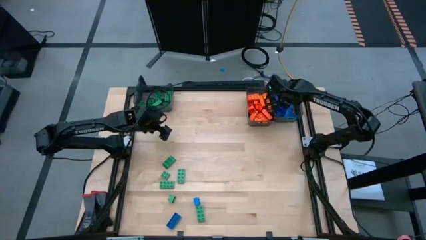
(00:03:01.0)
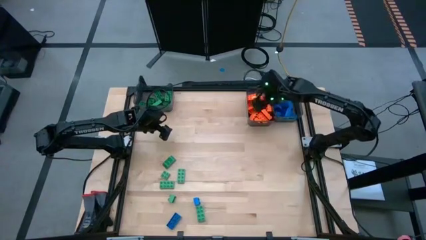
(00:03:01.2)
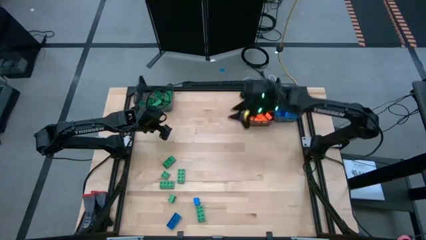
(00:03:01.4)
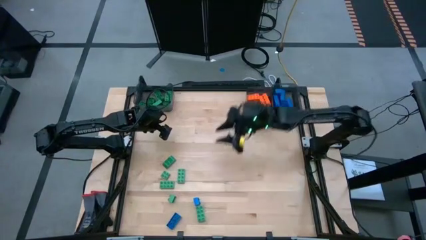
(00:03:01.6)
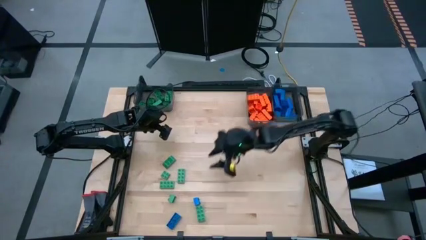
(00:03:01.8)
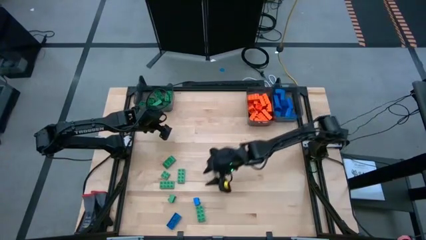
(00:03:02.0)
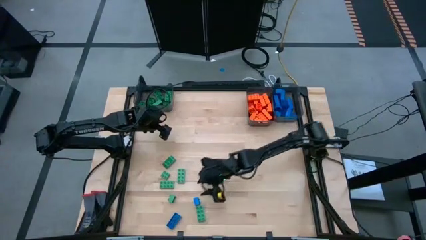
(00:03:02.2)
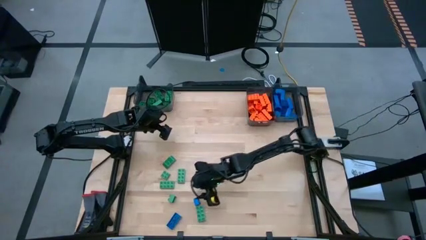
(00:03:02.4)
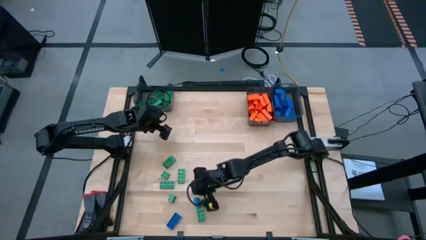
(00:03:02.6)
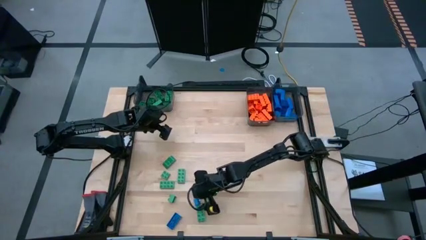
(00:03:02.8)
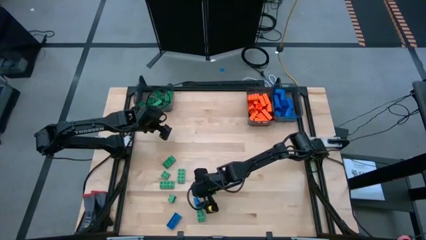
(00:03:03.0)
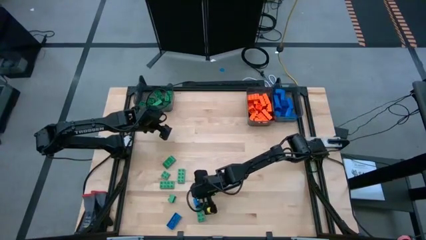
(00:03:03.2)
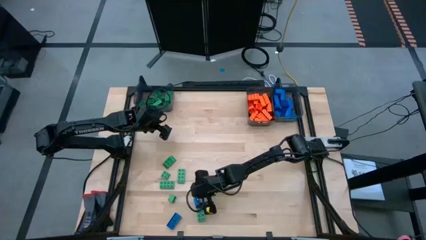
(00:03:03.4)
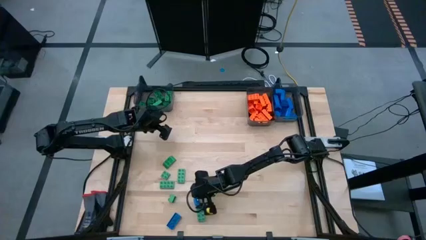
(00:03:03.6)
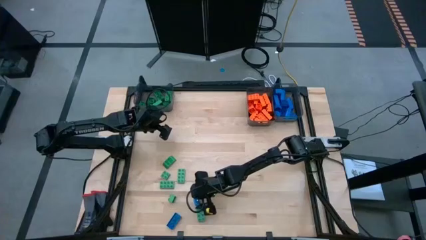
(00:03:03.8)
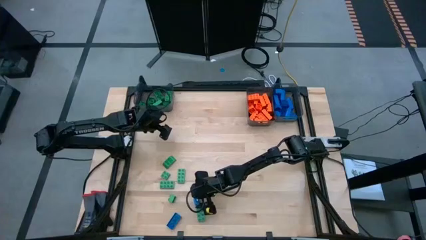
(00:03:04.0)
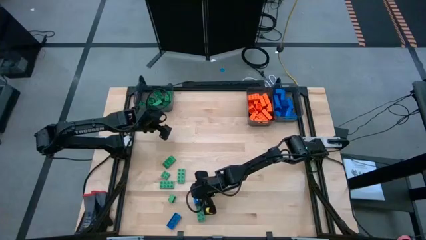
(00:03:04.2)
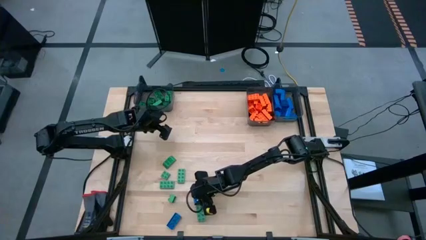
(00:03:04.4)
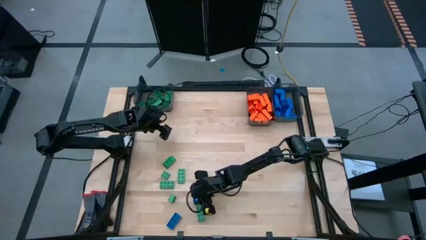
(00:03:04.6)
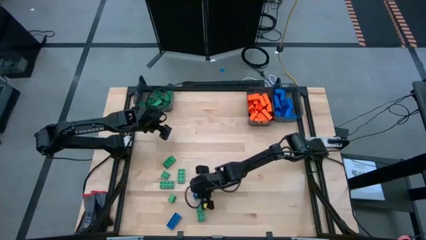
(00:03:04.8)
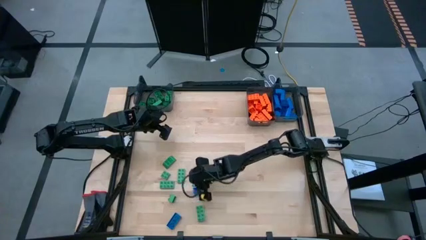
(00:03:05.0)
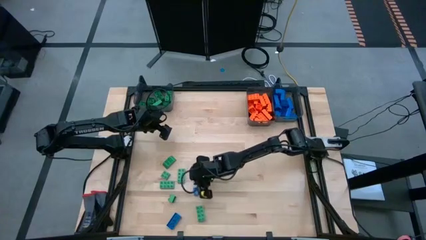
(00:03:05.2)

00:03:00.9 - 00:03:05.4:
Task: Sort blocks
Put the blue game piece into the right black bin

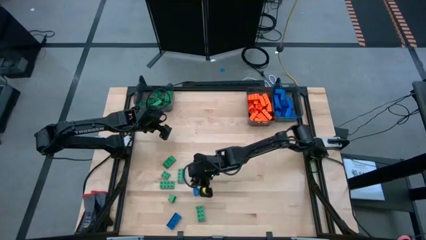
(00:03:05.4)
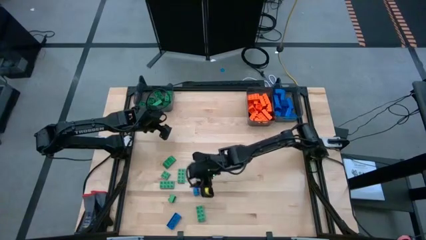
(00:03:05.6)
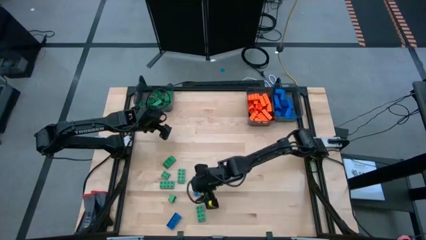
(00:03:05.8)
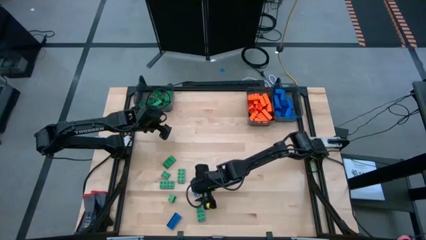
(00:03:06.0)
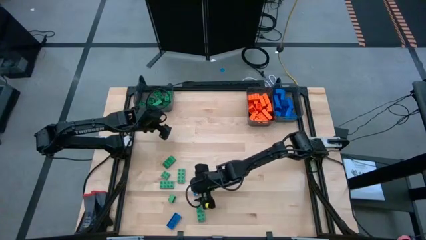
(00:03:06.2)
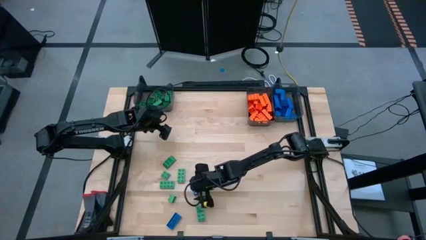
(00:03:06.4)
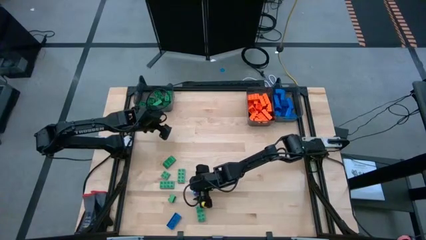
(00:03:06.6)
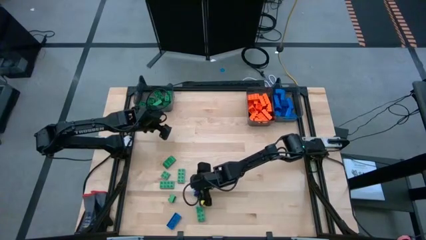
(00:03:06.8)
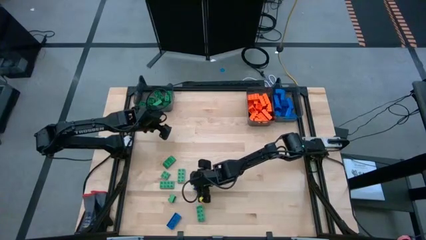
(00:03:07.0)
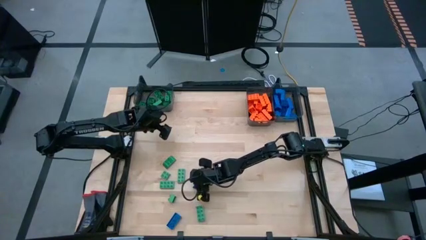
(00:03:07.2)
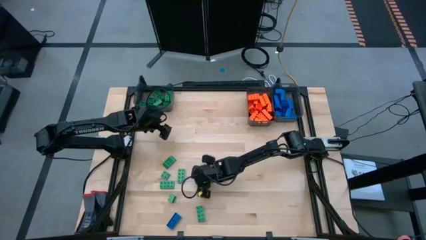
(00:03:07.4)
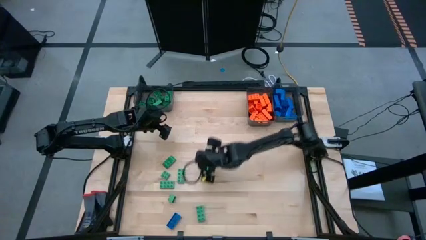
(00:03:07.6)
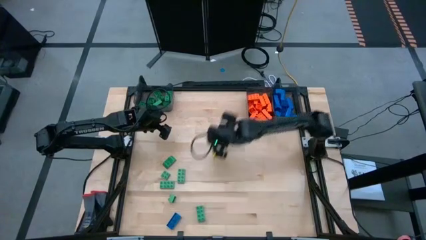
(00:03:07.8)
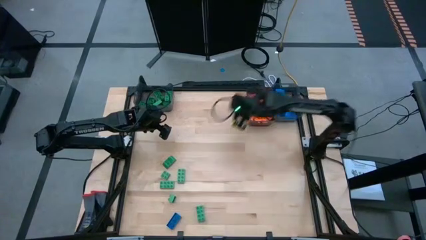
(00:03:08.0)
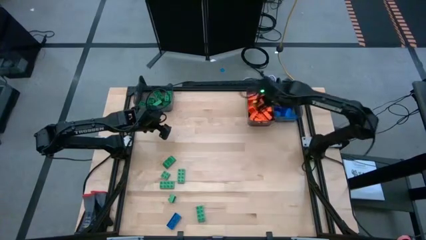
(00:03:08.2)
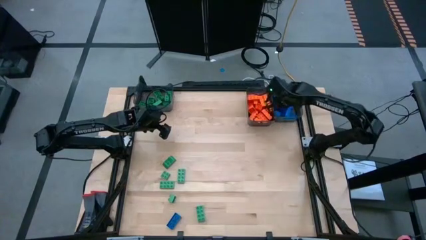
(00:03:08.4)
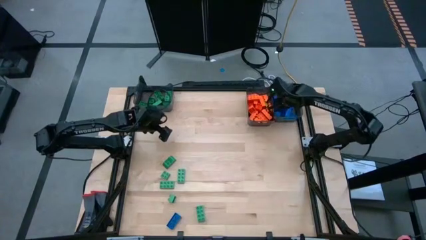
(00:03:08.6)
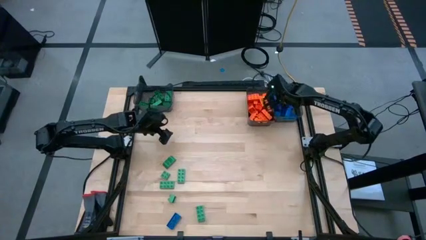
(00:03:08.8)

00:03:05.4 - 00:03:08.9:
Put the blue game piece into the right black bin

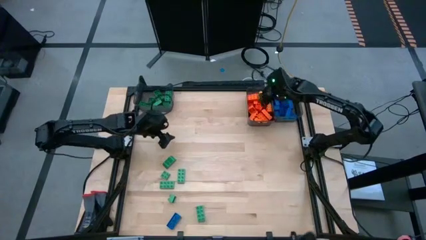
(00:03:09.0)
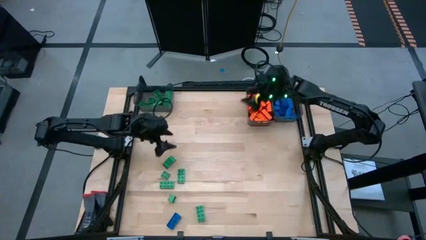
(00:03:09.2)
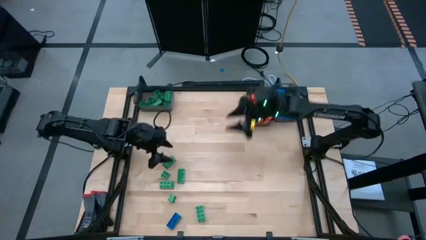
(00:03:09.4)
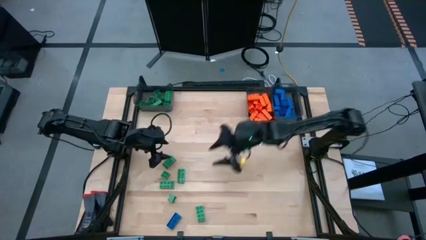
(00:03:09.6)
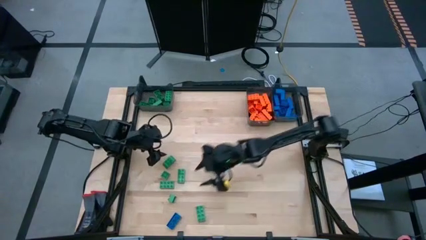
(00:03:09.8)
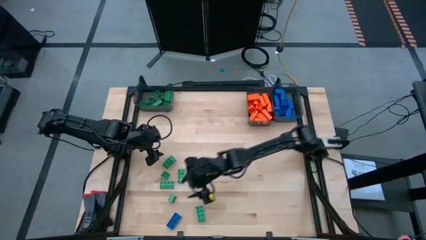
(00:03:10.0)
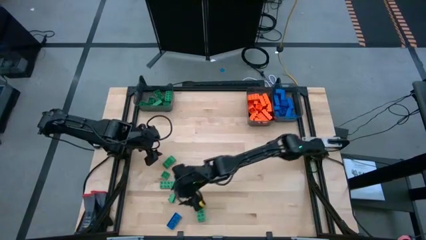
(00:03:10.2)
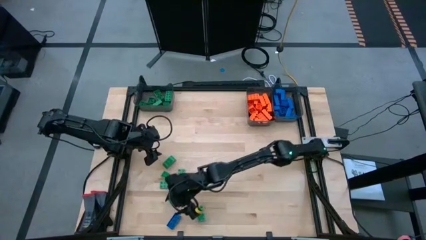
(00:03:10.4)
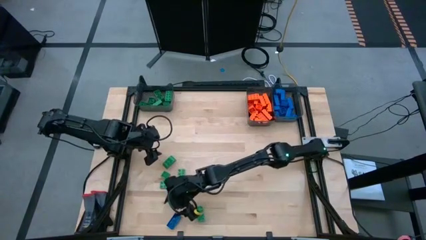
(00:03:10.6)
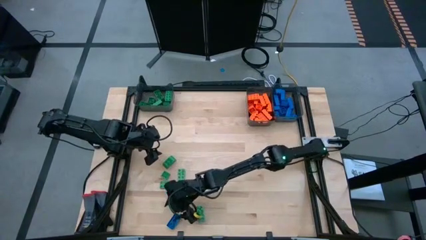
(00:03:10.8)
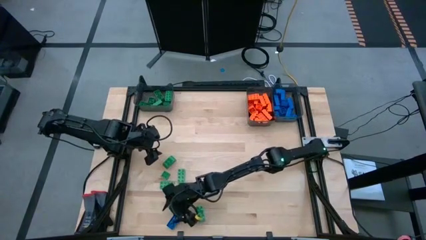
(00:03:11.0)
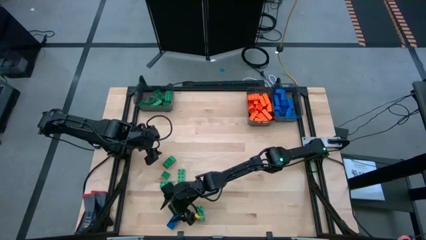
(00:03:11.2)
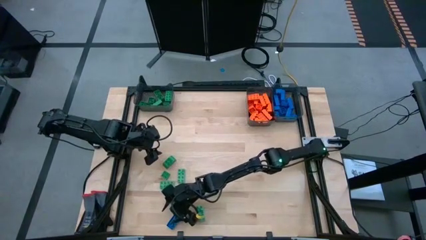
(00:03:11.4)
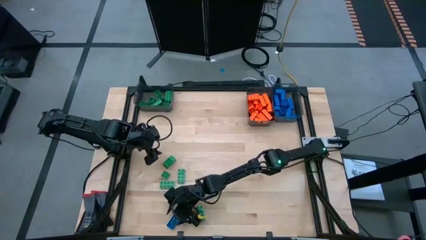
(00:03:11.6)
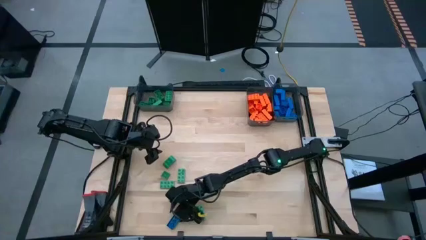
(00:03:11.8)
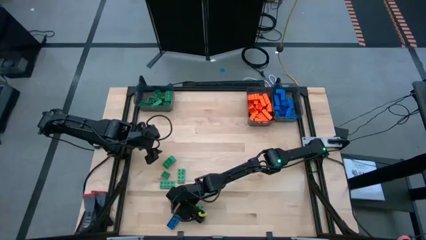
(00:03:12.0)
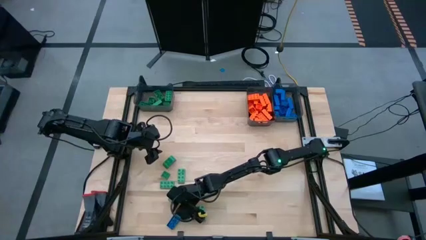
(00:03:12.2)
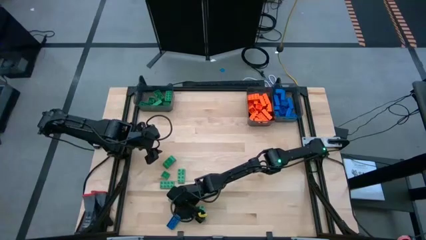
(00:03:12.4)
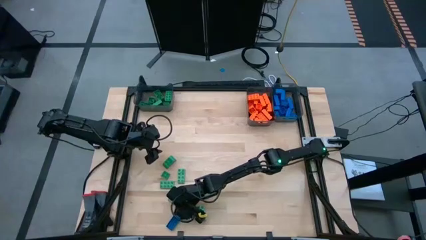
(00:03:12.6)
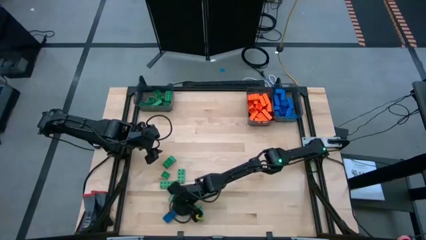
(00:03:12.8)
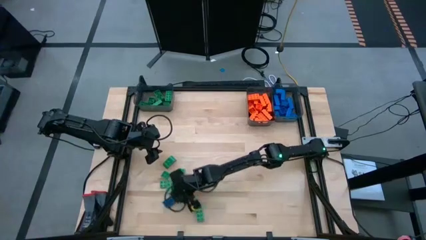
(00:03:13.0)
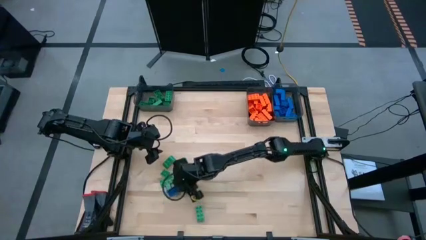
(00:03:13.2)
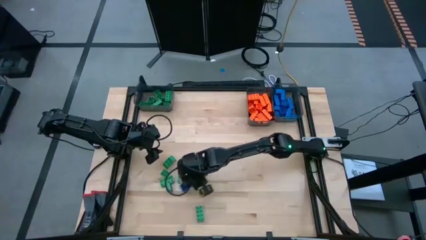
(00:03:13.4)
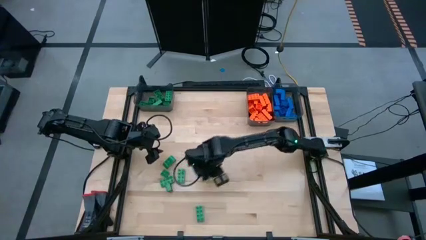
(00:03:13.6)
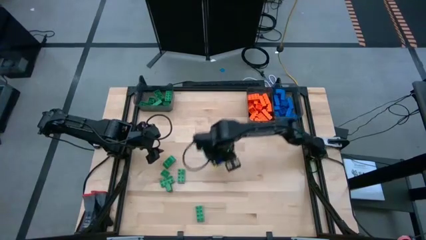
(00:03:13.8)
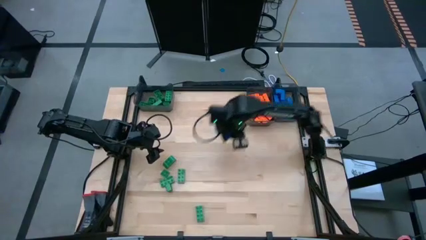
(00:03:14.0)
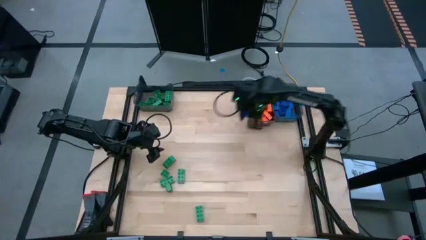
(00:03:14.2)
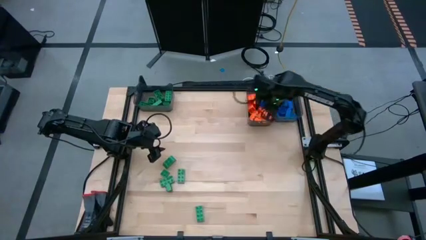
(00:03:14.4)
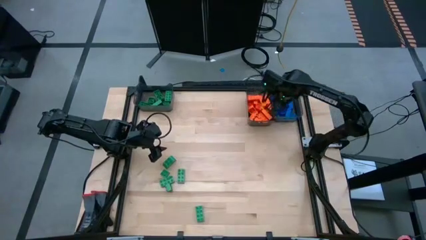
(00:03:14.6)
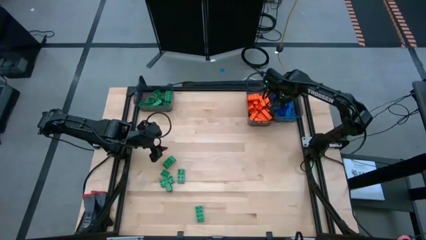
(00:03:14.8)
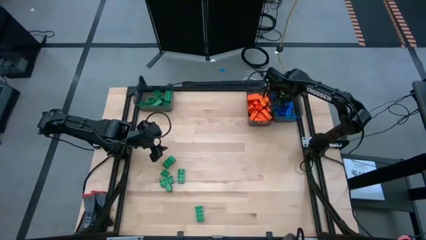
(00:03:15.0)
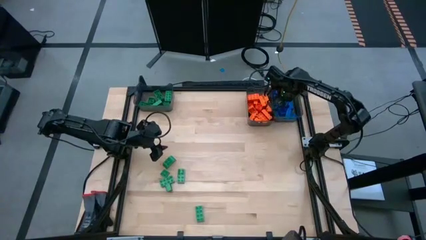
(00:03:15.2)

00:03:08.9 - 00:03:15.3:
Put the blue game piece into the right black bin
